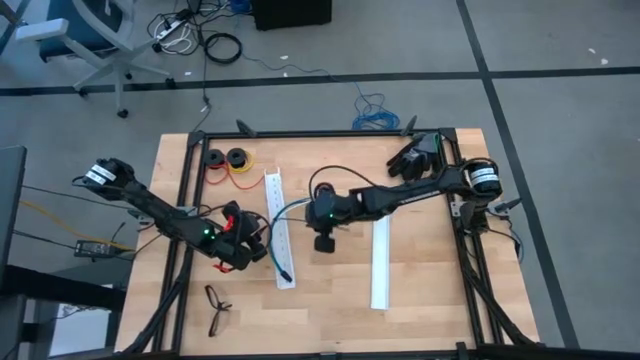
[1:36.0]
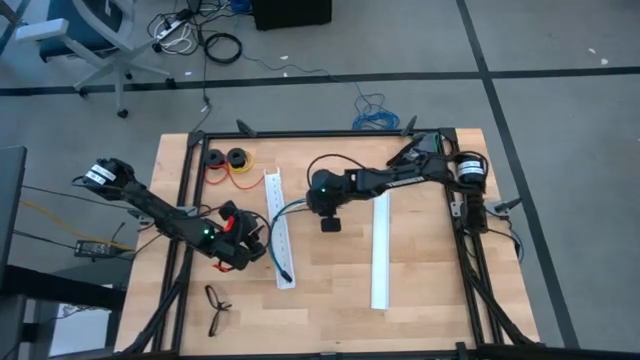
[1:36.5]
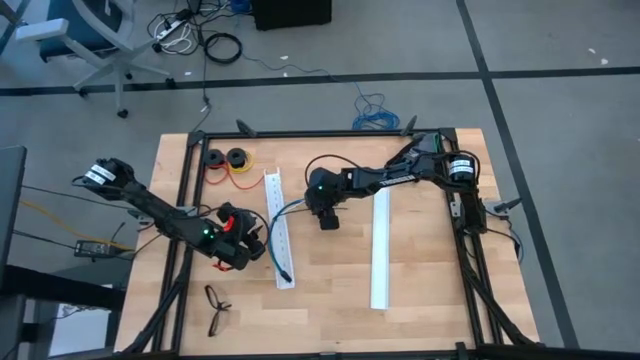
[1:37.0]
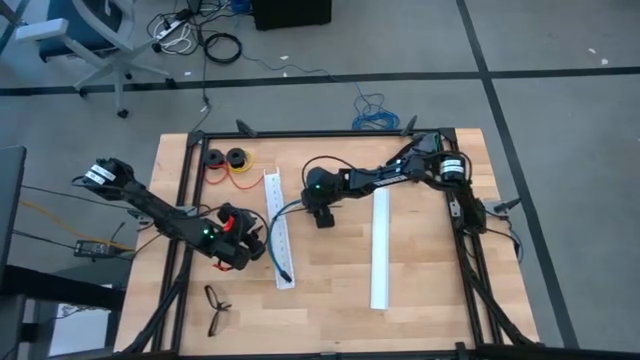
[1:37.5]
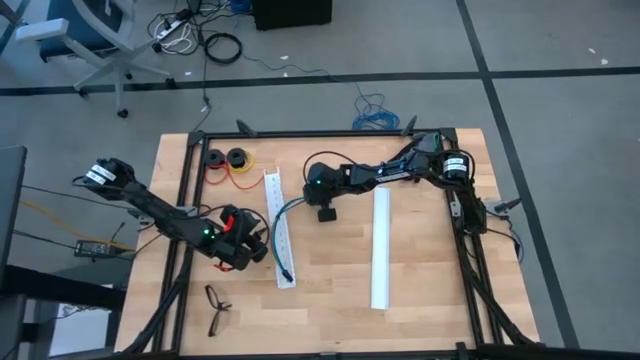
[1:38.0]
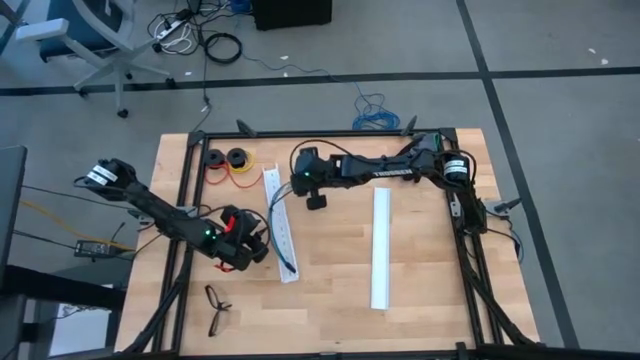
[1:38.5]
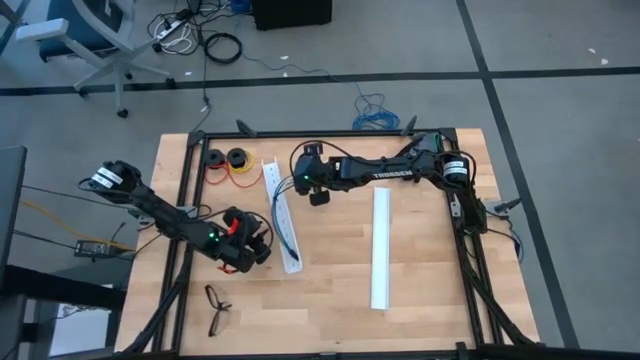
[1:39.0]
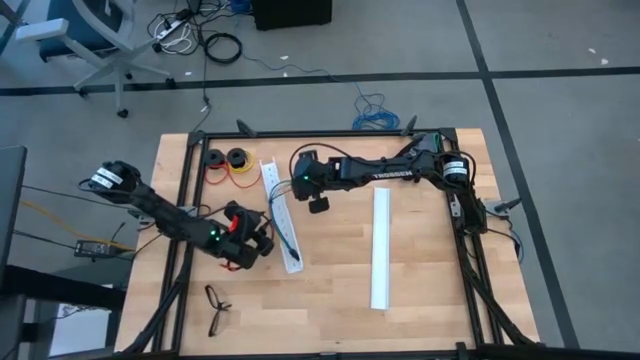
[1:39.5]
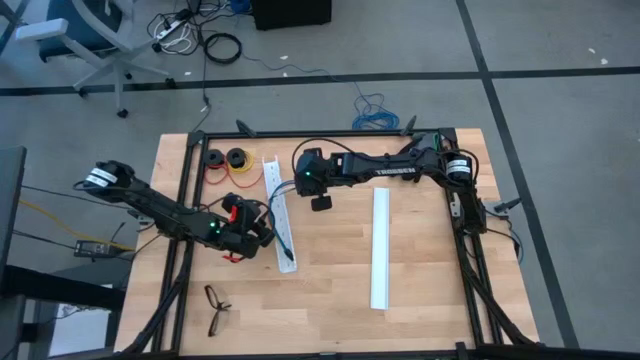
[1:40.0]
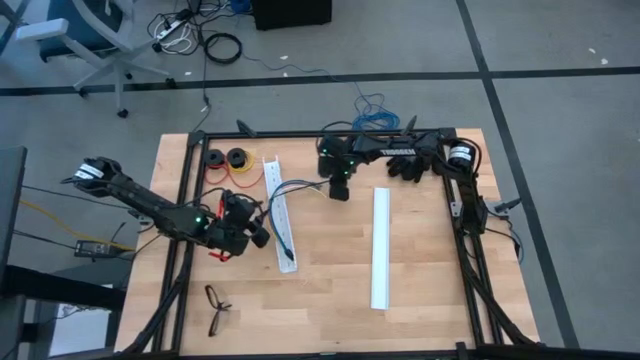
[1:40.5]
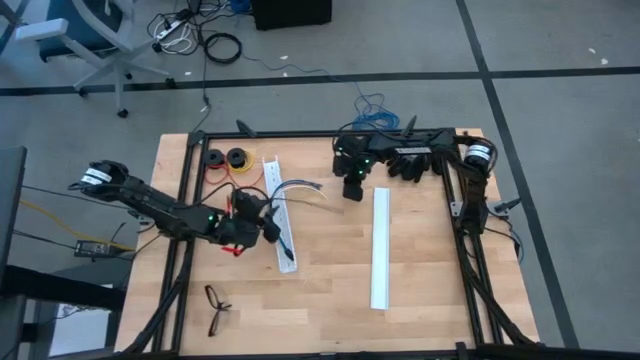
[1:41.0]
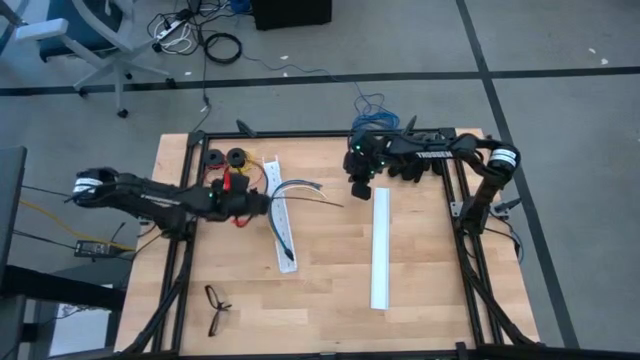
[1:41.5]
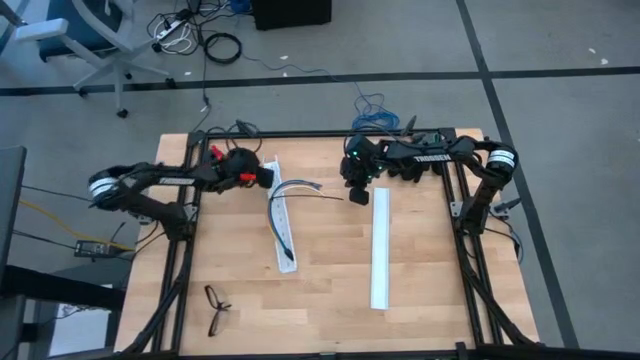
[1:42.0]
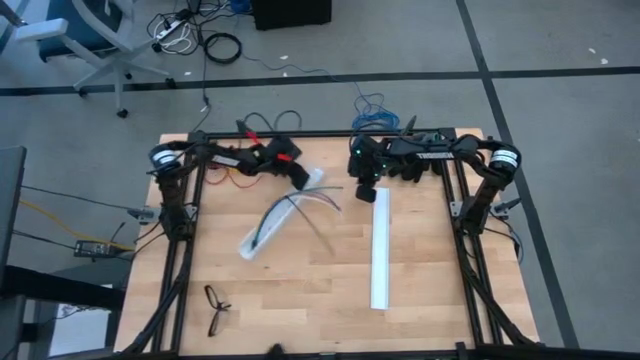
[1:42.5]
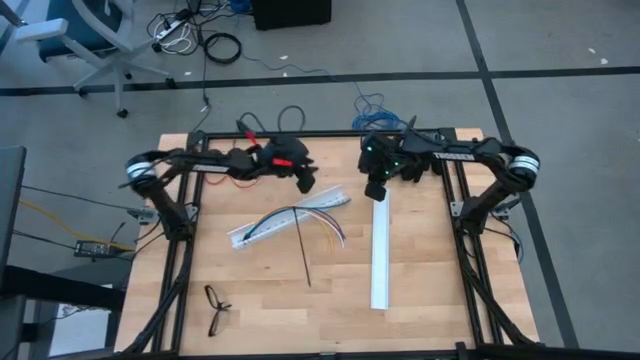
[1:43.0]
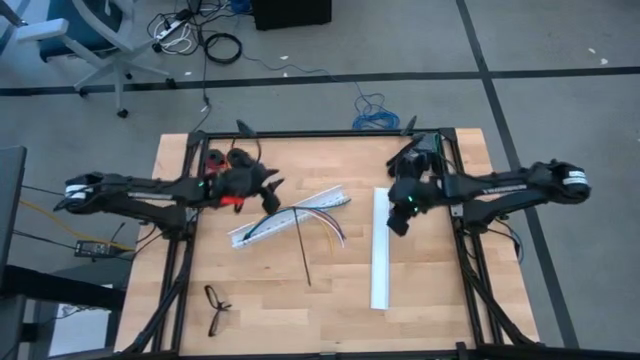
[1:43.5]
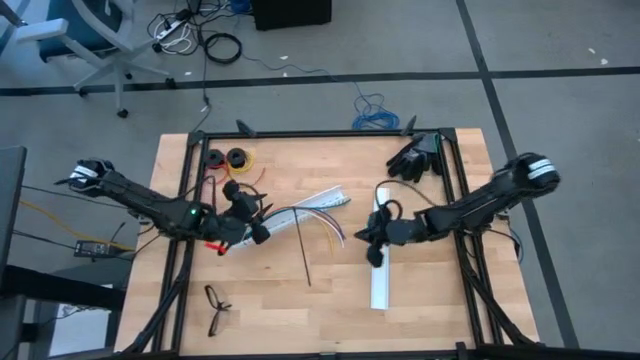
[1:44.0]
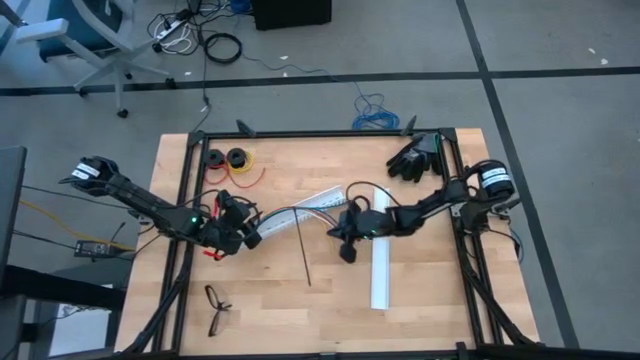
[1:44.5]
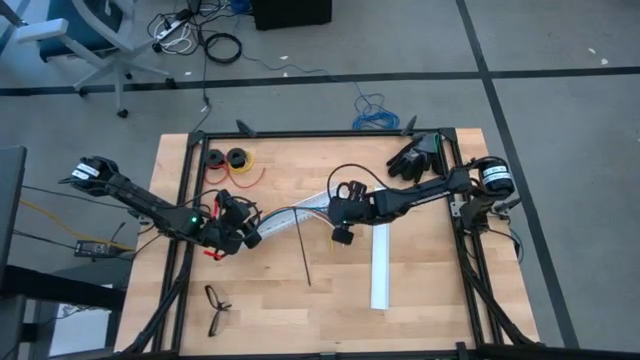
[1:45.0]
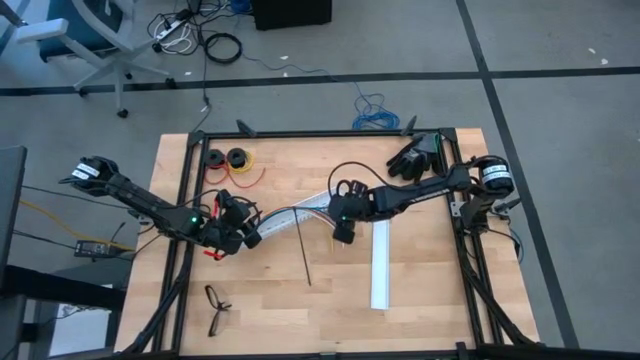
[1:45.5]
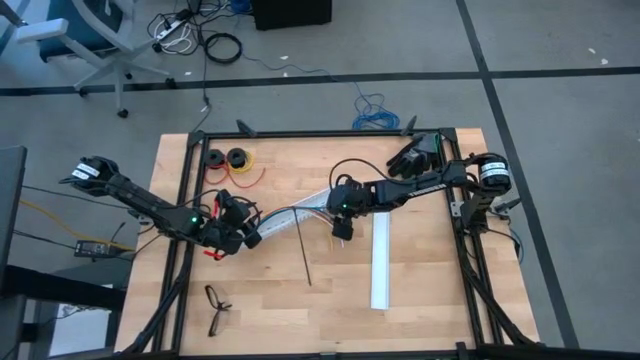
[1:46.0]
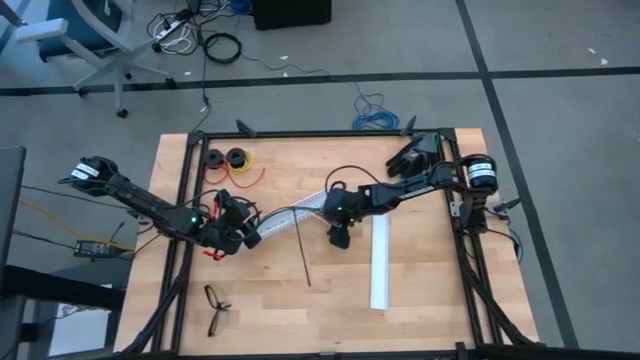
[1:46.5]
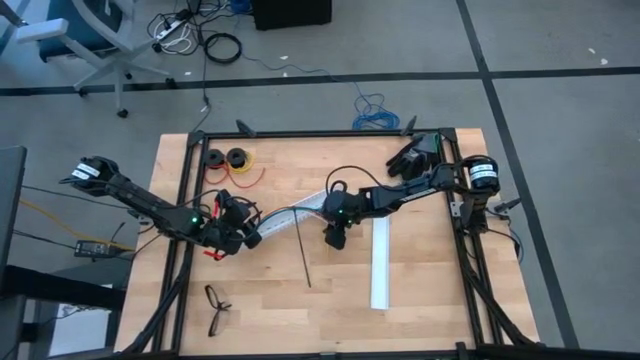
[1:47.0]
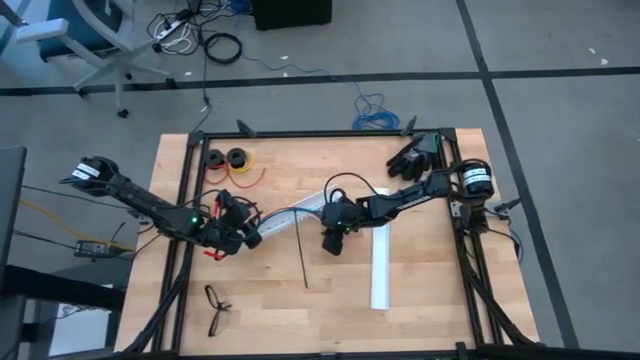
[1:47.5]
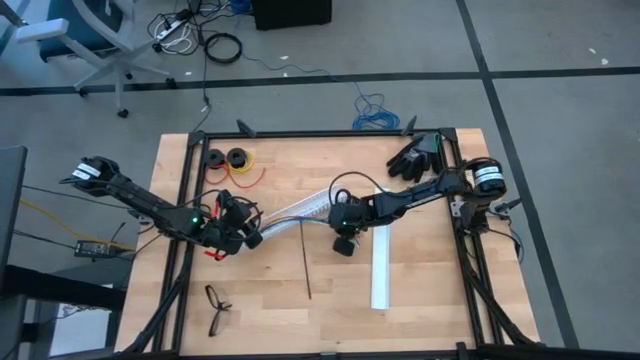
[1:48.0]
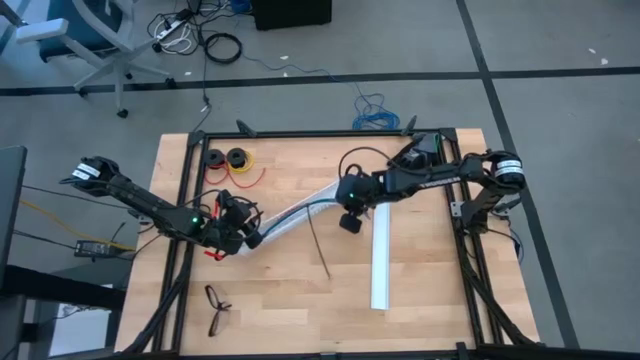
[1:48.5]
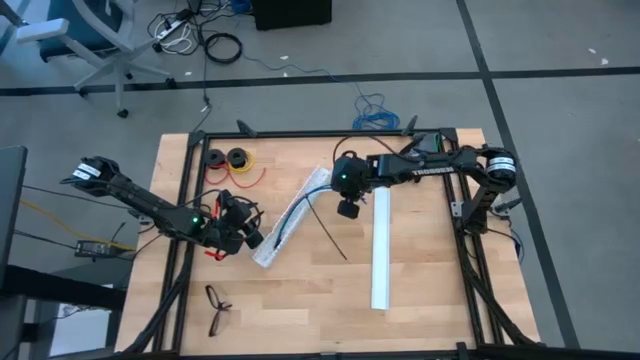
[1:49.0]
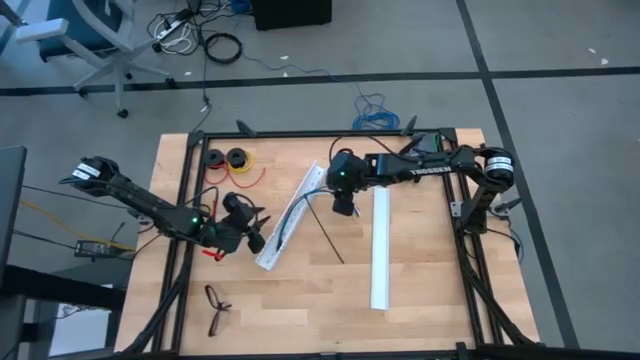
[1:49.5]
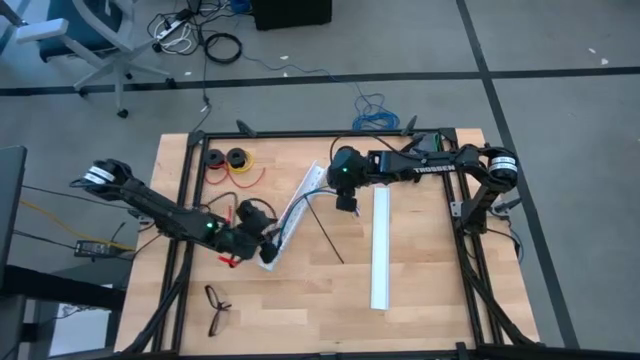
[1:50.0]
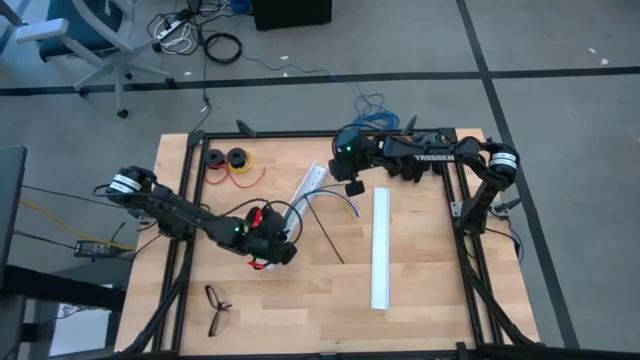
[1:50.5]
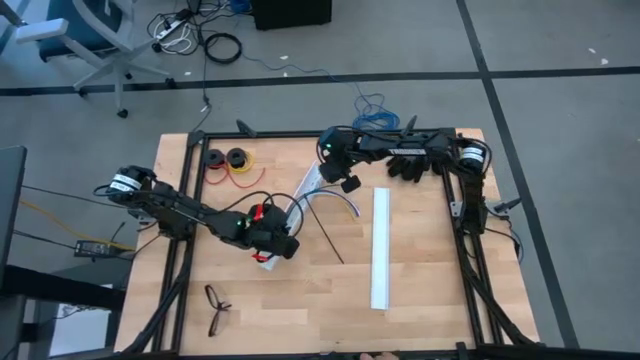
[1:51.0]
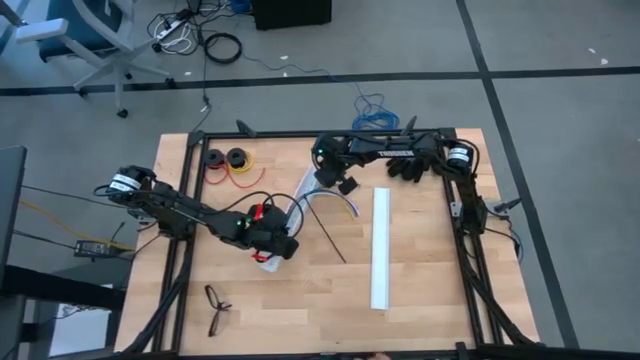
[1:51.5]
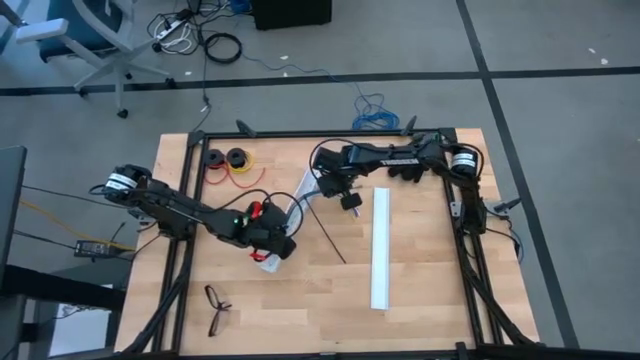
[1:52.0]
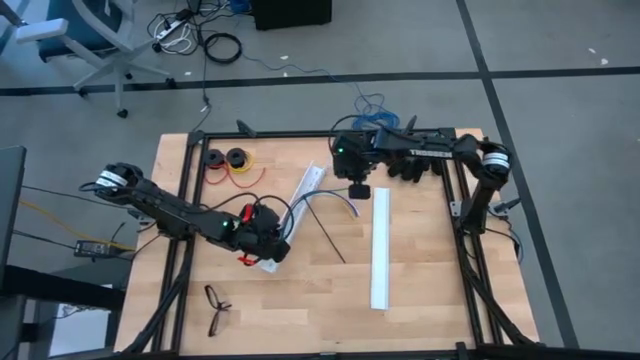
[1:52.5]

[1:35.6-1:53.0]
Task: Ziptie cables
Put the zip-tied cables into the white cable duct

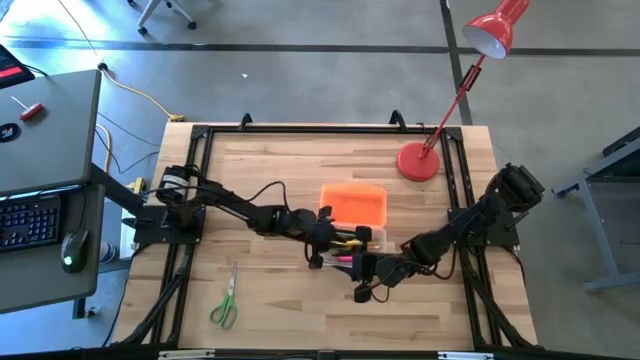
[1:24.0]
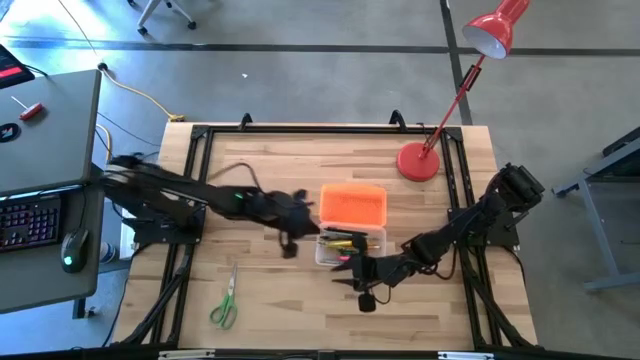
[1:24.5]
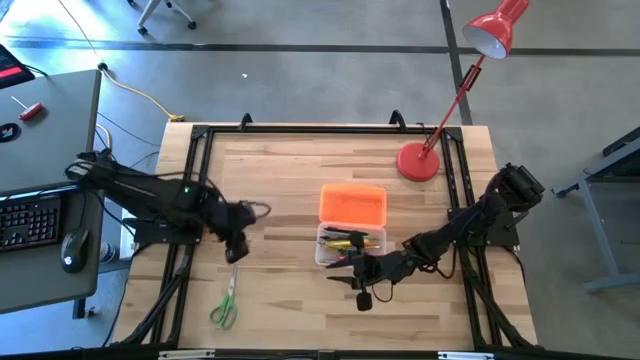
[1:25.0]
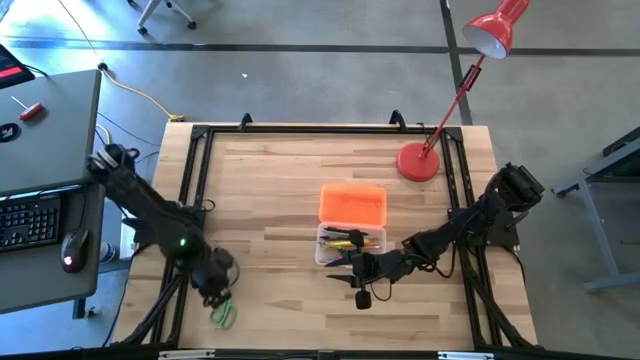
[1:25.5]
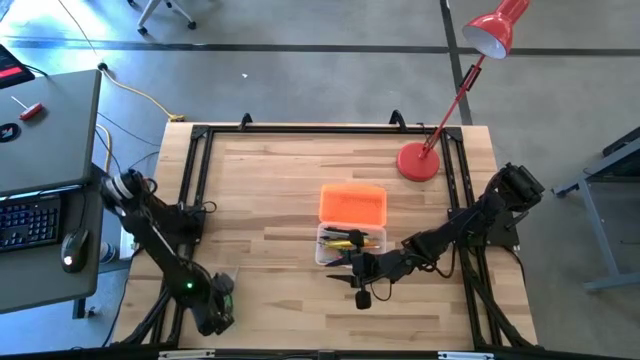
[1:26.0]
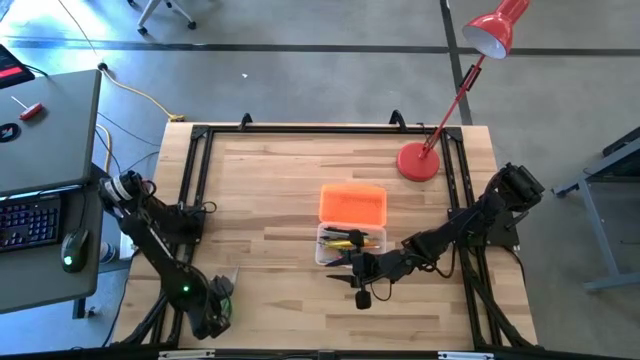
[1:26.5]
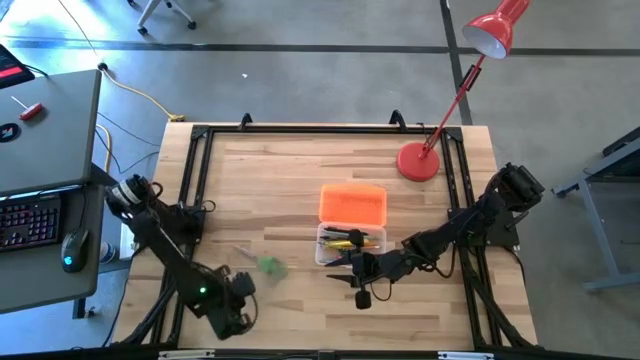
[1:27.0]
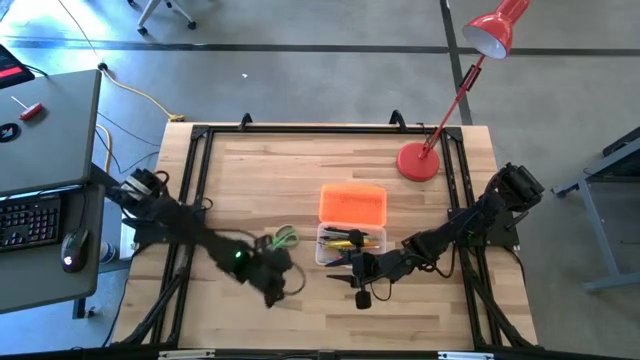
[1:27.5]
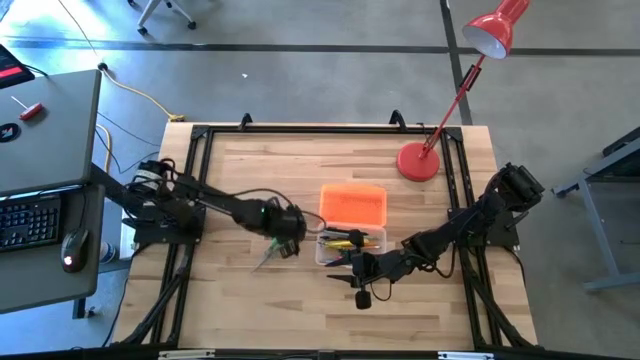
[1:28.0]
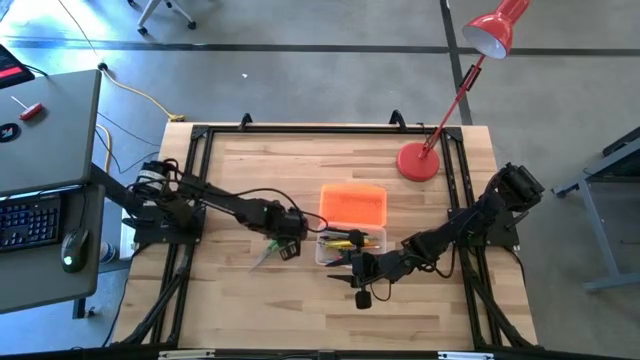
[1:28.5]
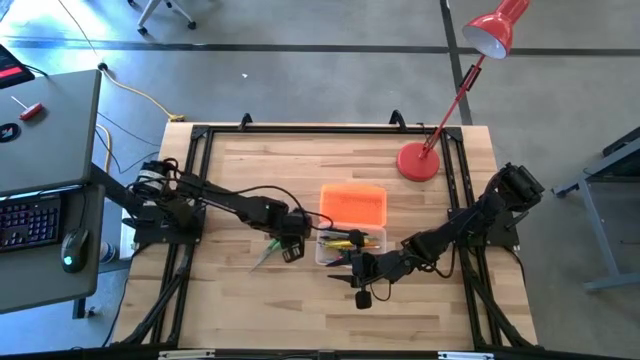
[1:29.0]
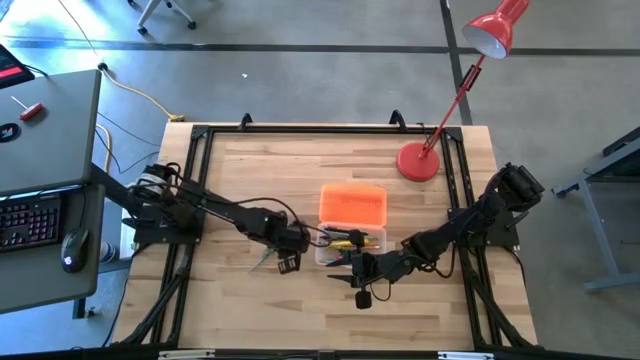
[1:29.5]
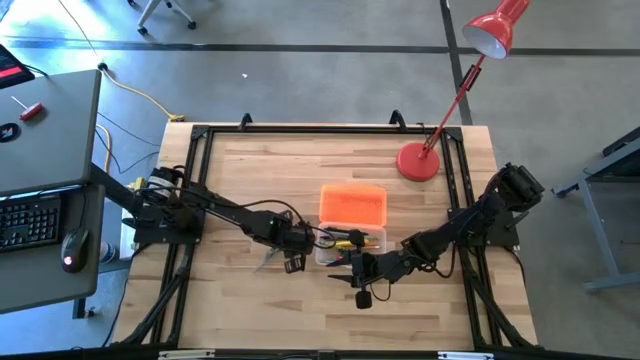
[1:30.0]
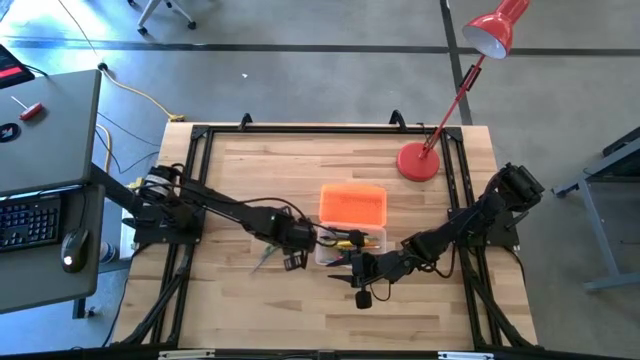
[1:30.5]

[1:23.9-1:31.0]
Task: Pick & place school supplies into a supply box
Put the green scissors into the supply box
